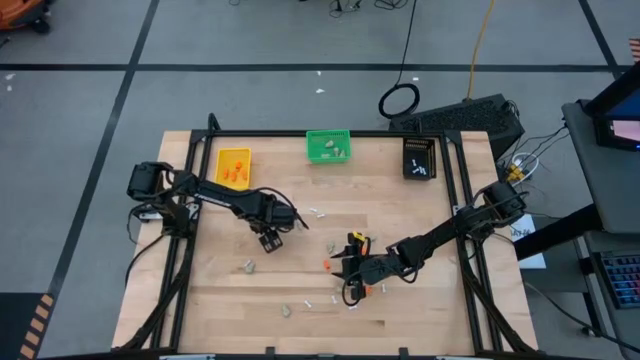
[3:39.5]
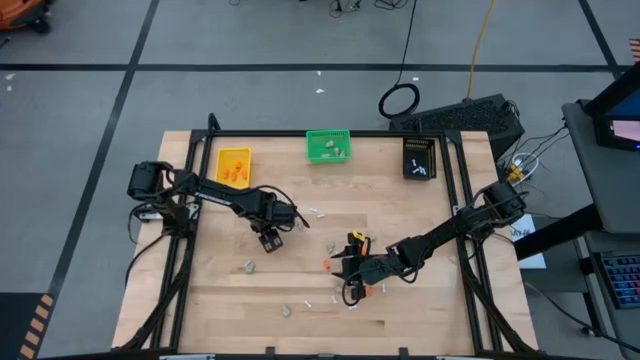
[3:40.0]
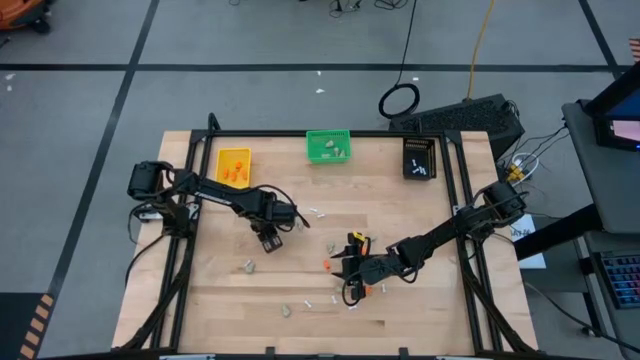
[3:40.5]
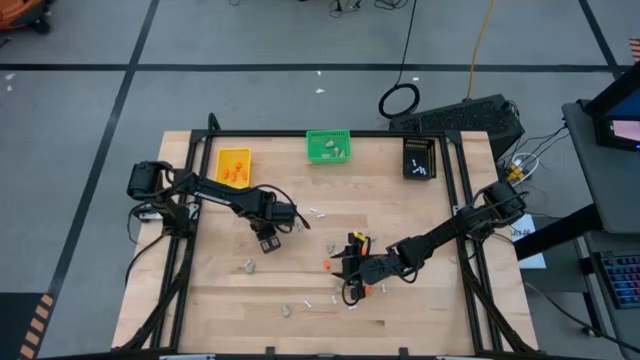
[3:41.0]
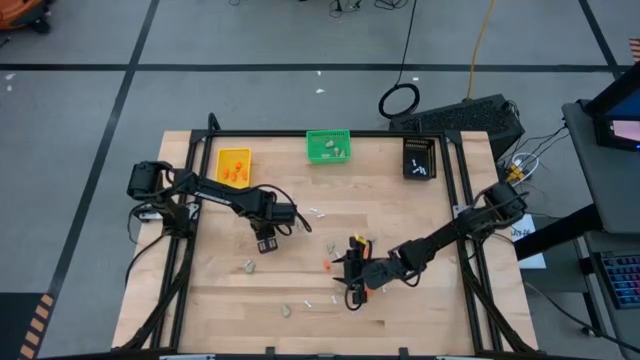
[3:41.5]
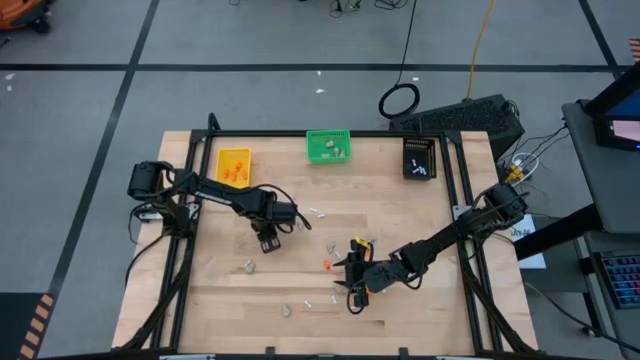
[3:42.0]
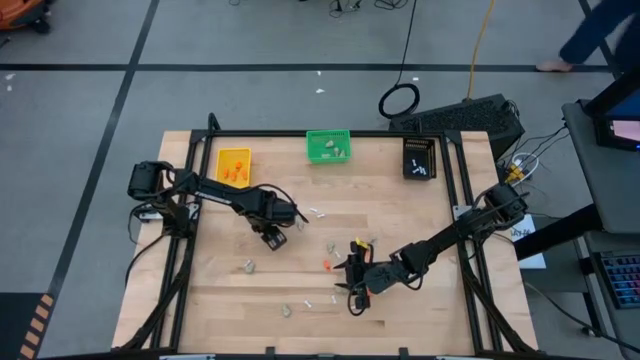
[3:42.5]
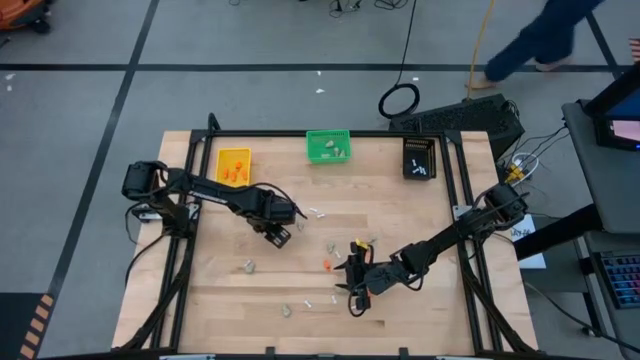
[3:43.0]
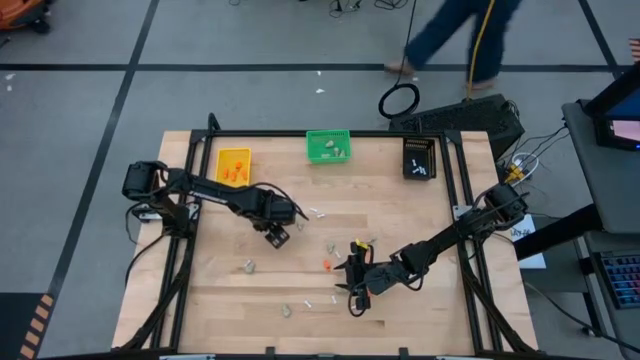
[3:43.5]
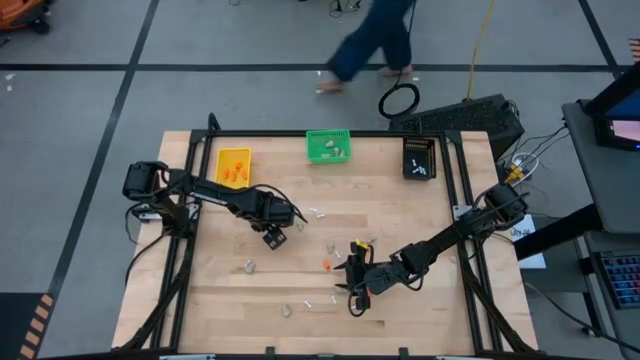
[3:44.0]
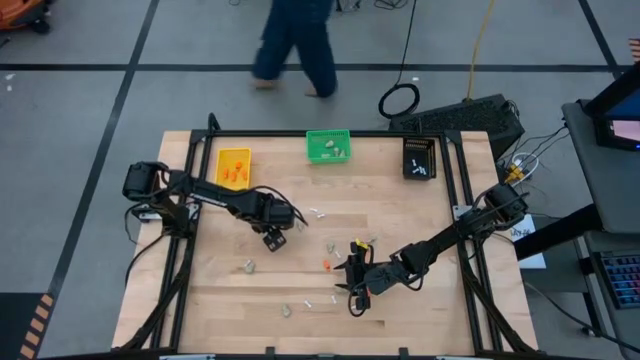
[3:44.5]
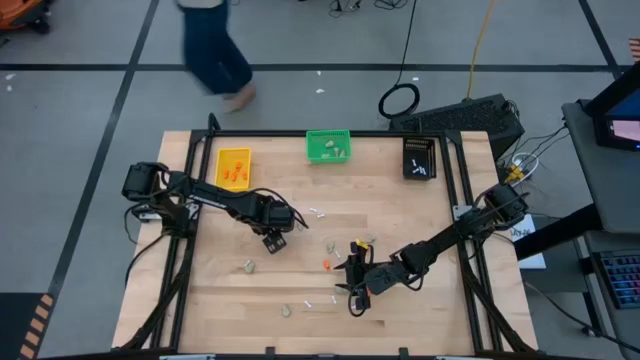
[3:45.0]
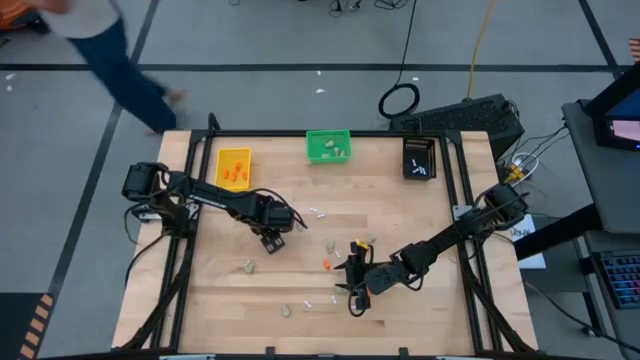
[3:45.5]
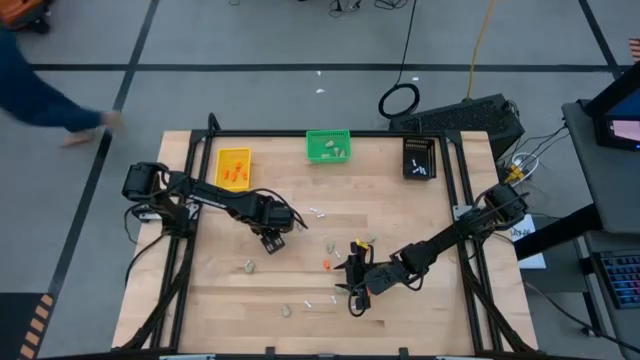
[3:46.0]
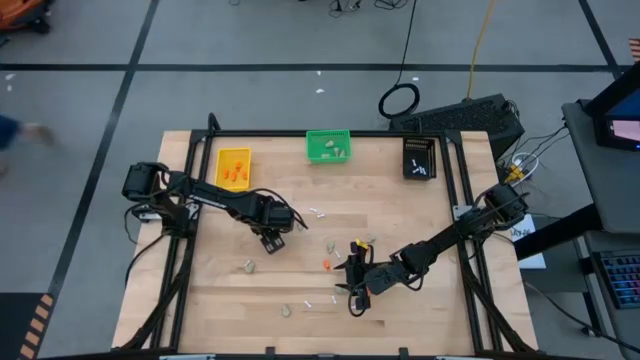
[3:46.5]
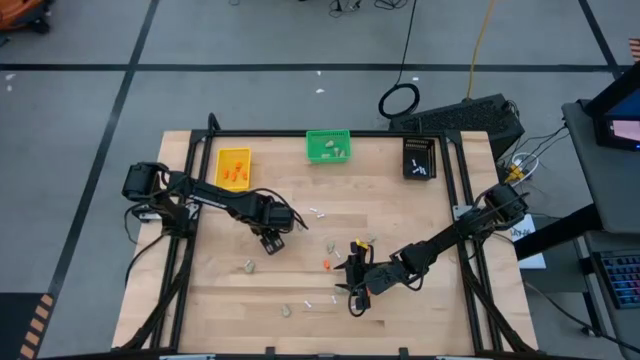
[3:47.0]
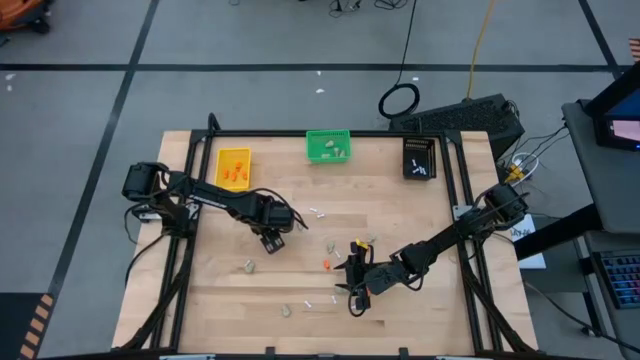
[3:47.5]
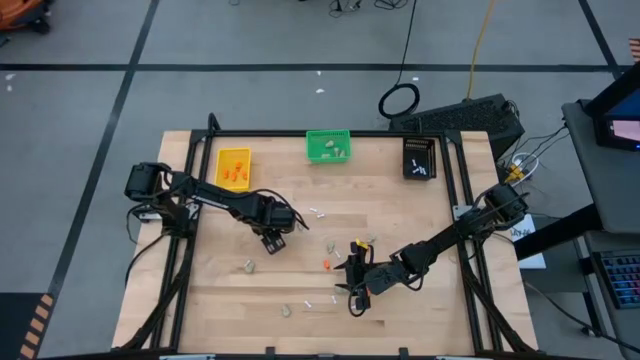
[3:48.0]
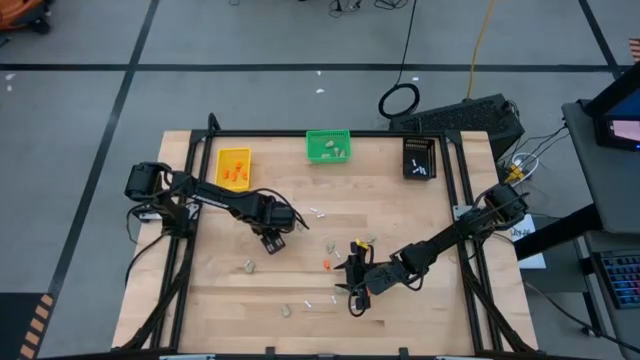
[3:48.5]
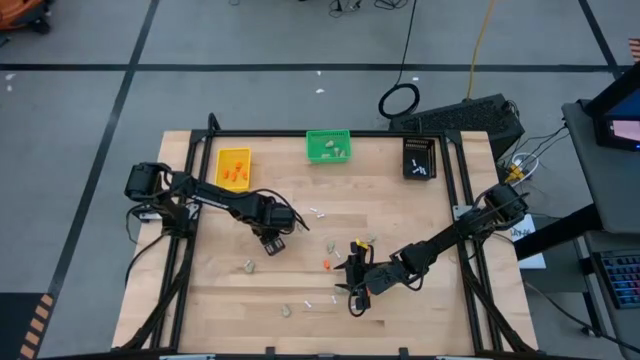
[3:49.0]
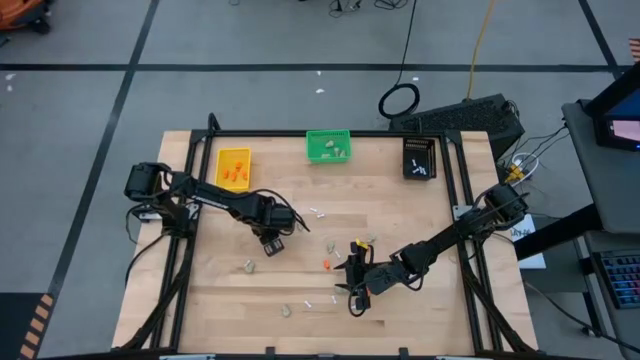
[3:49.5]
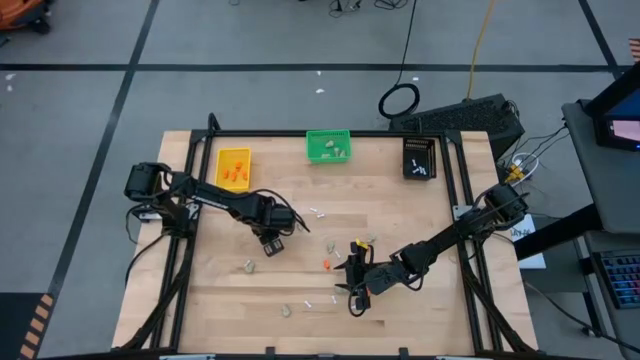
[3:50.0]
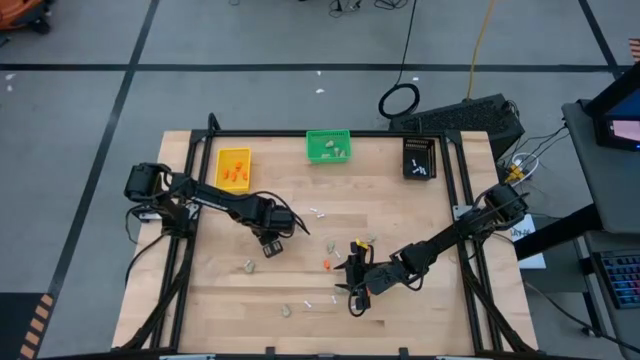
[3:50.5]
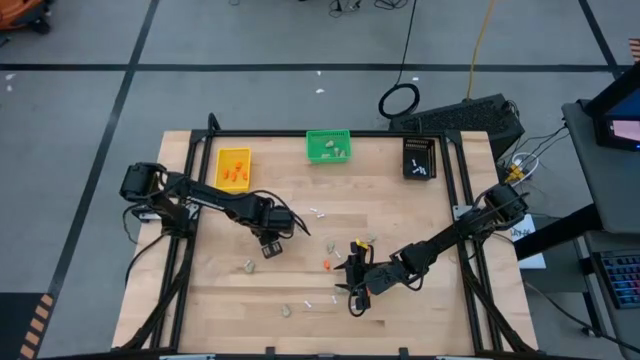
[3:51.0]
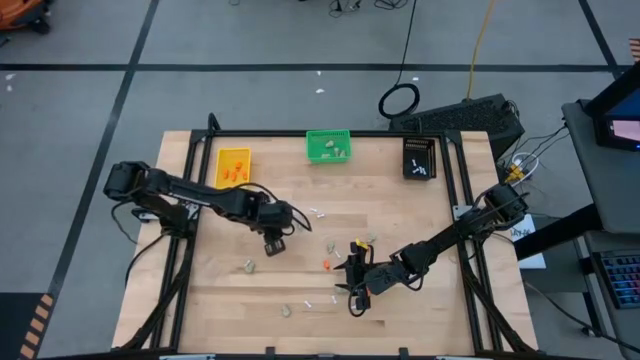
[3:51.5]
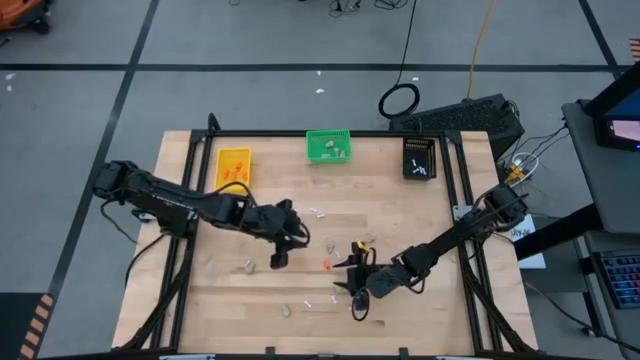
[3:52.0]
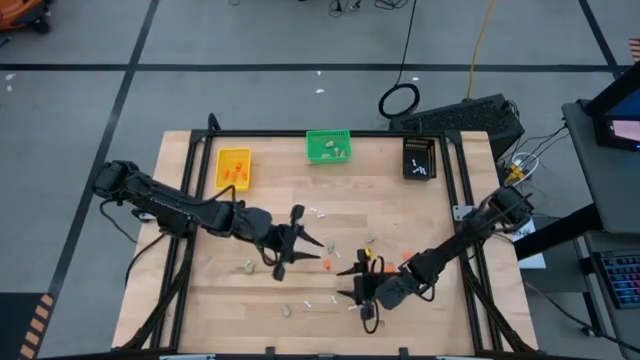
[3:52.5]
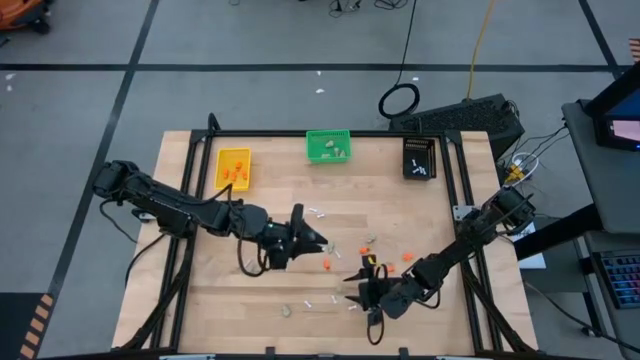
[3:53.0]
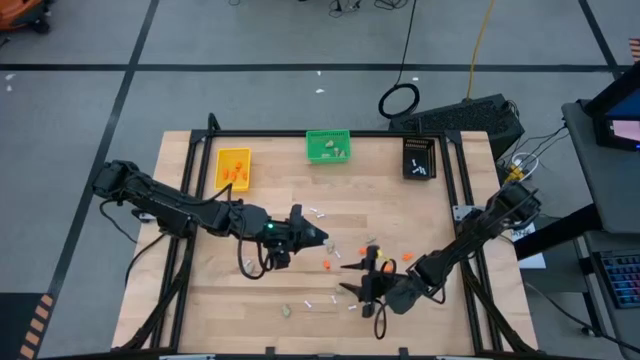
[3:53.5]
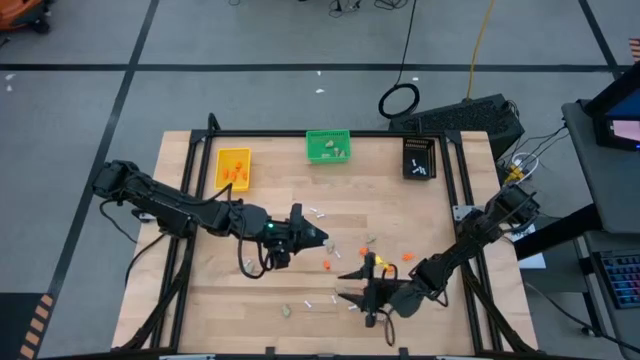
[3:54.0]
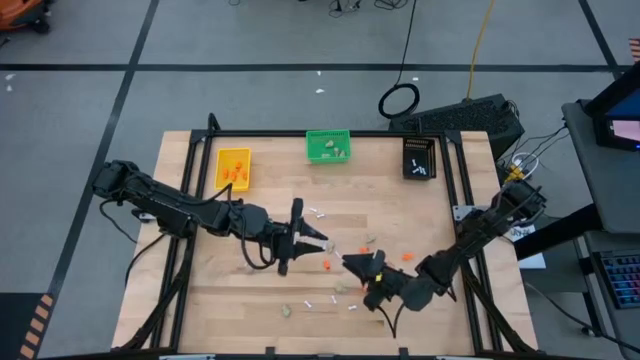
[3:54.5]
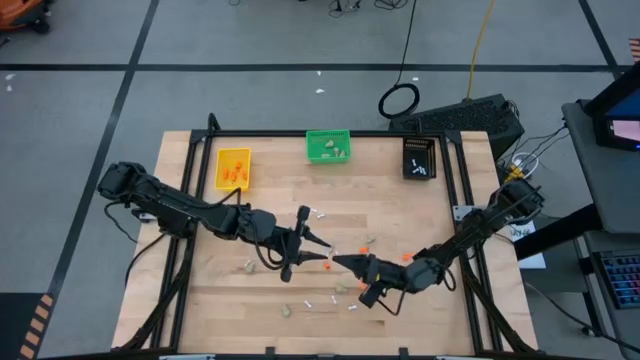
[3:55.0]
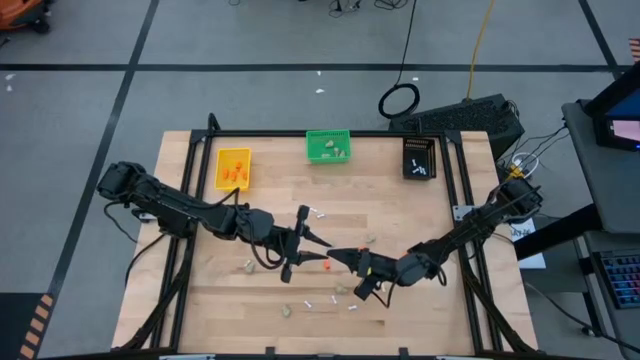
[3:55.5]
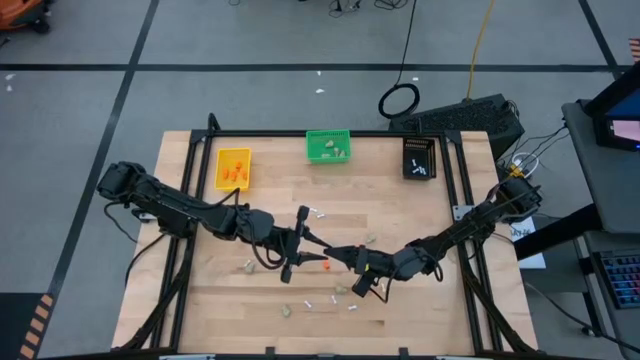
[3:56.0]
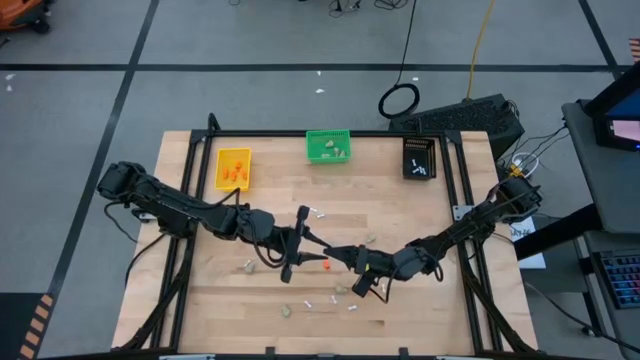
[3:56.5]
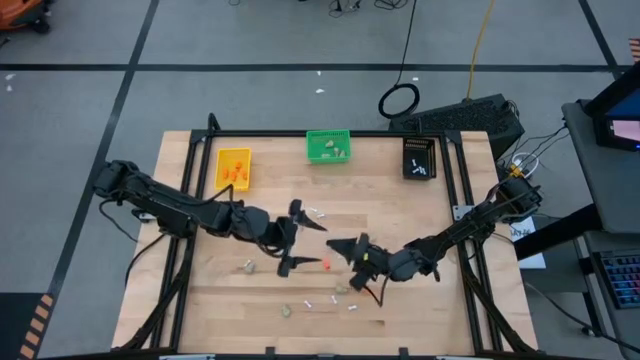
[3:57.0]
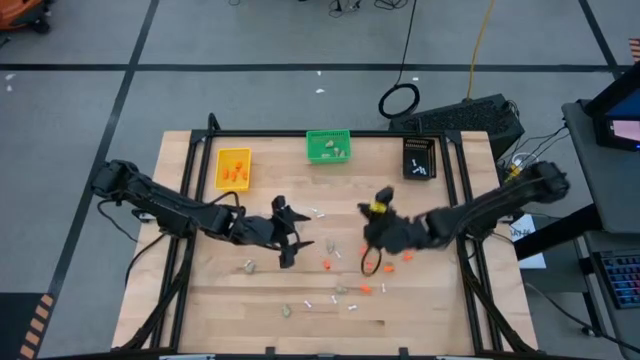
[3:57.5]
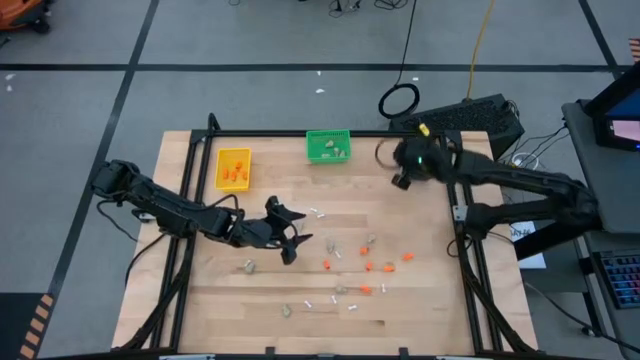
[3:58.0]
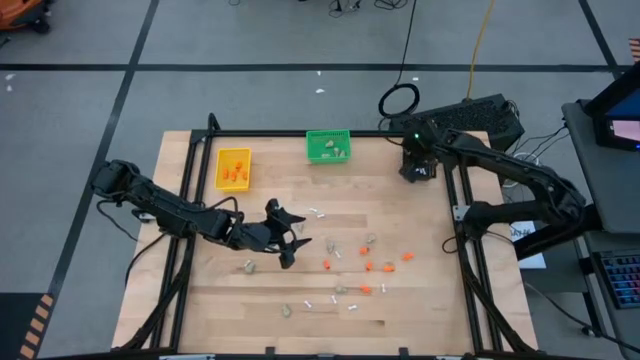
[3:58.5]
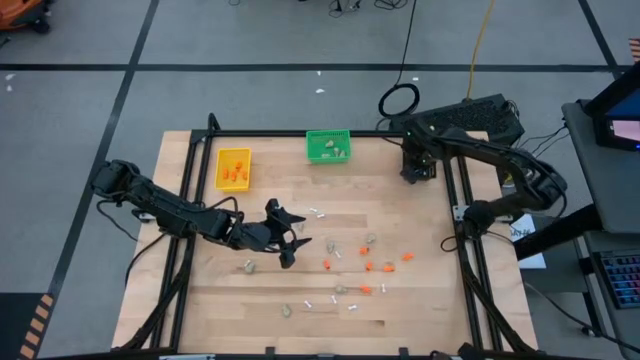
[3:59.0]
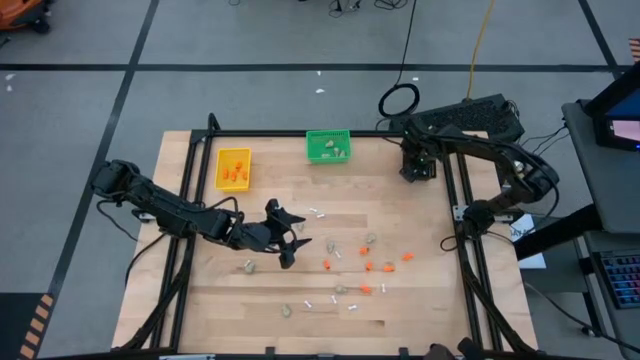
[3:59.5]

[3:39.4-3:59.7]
Task: Sort Halloween decoration
Put the white bone toy into the black bin
